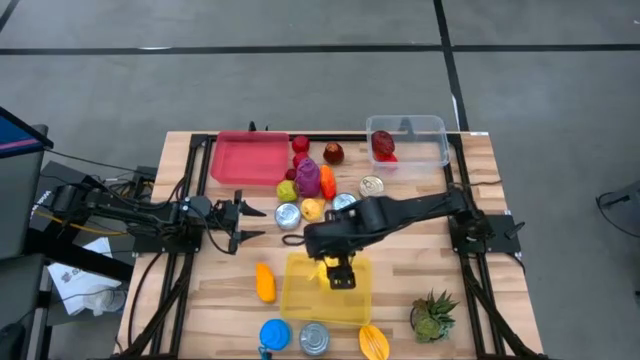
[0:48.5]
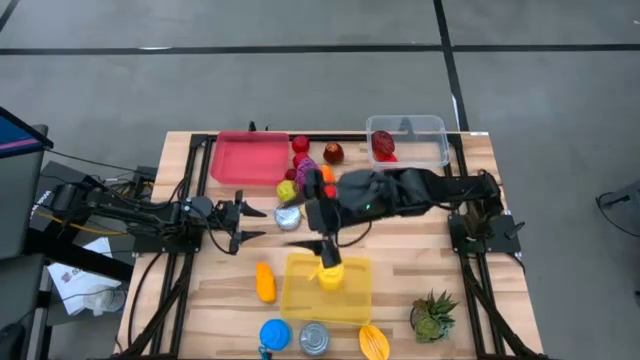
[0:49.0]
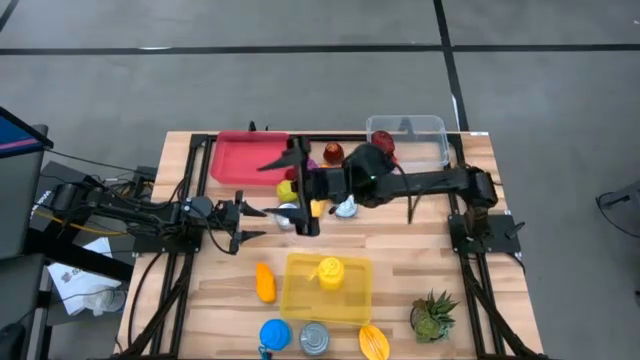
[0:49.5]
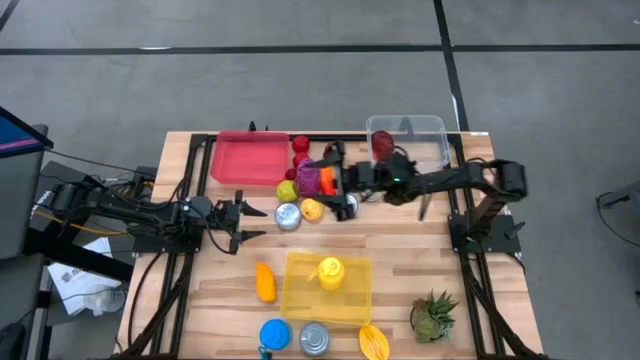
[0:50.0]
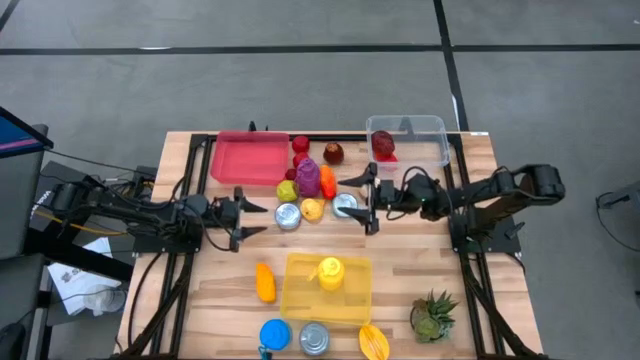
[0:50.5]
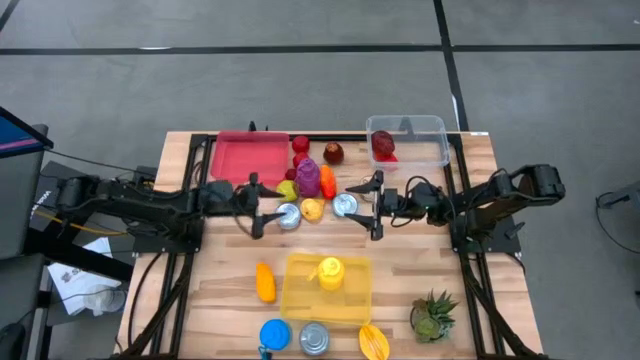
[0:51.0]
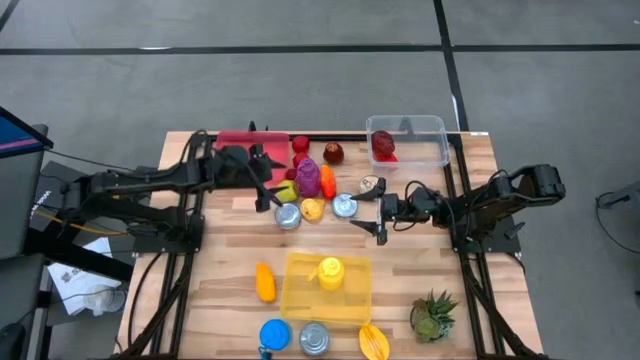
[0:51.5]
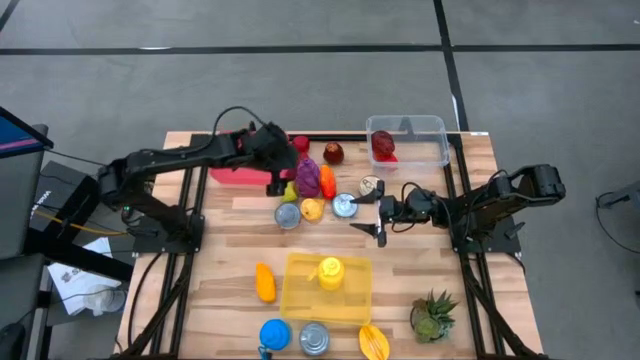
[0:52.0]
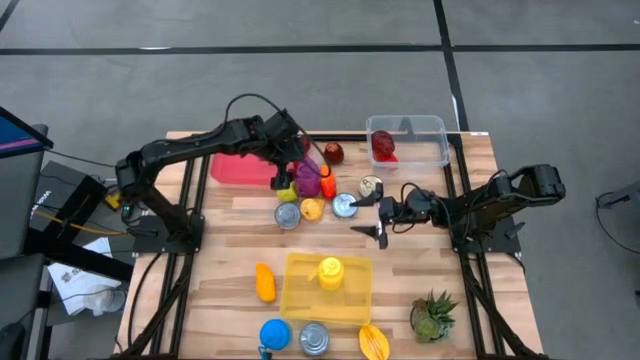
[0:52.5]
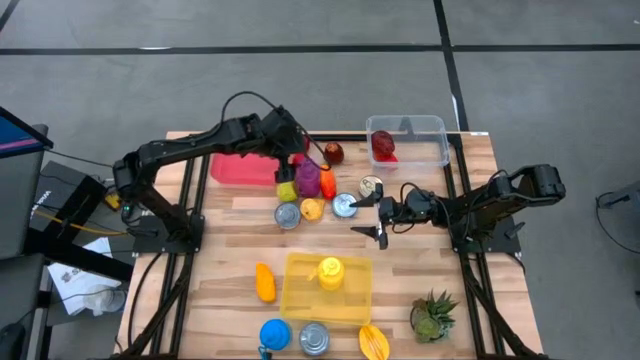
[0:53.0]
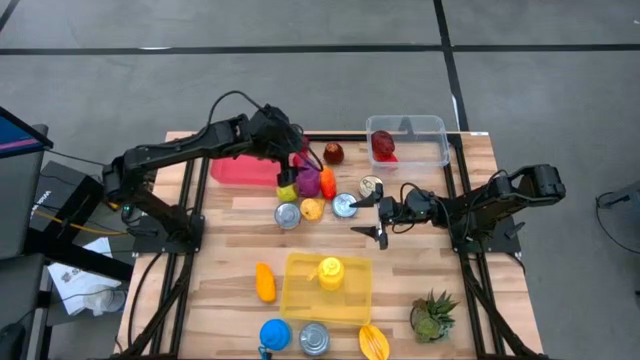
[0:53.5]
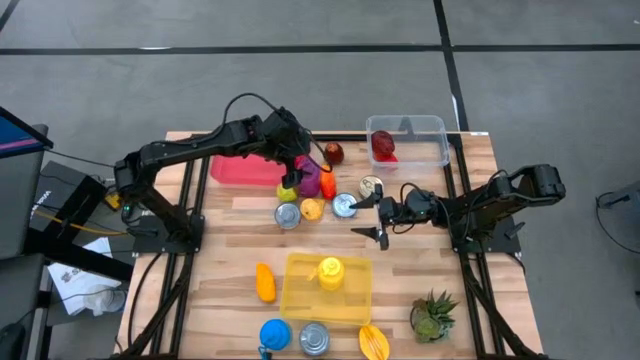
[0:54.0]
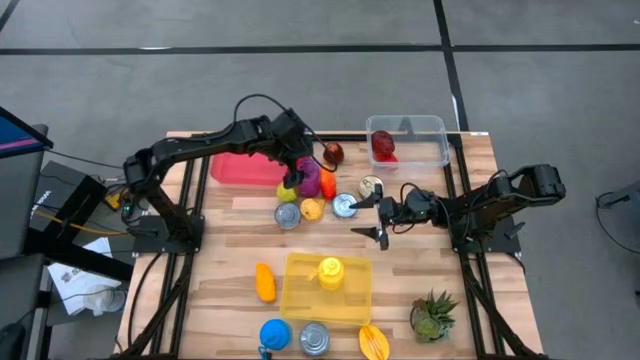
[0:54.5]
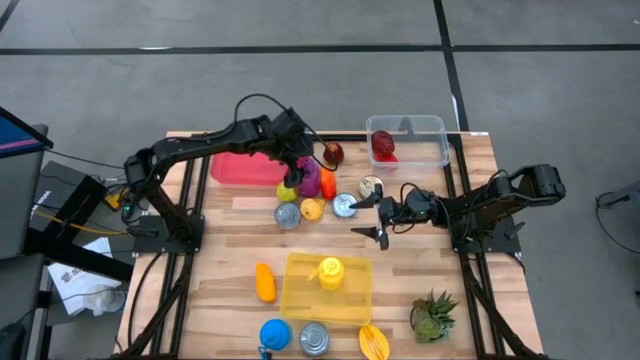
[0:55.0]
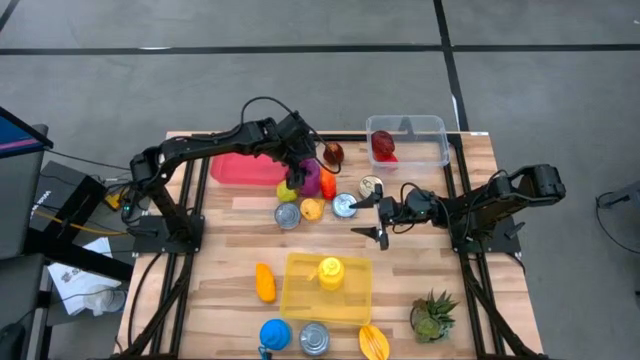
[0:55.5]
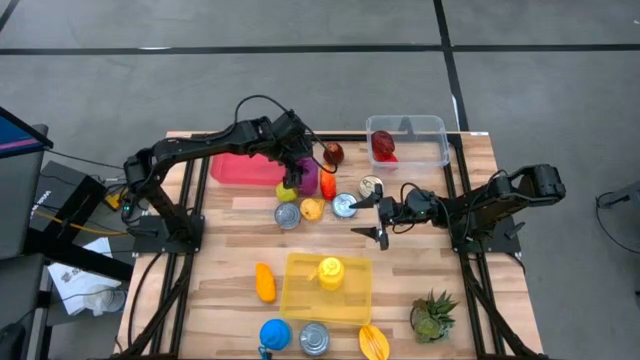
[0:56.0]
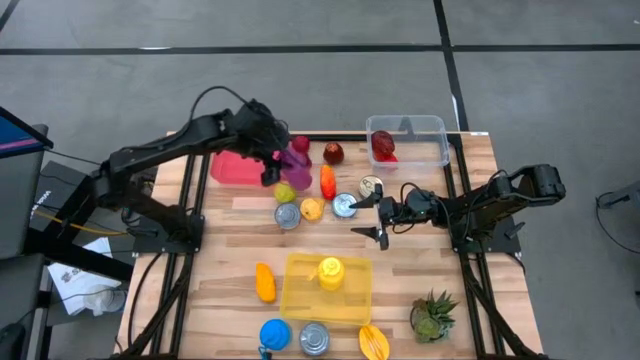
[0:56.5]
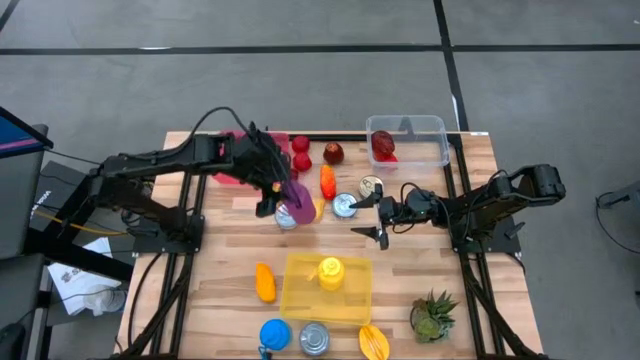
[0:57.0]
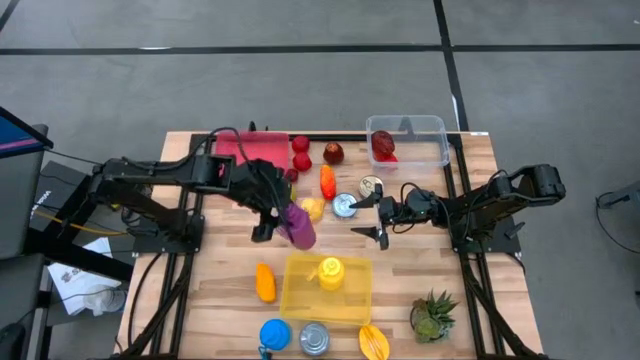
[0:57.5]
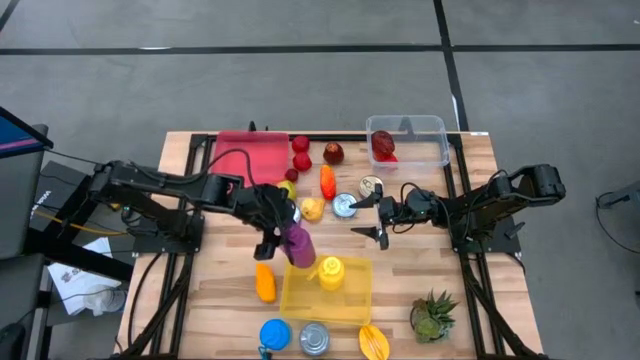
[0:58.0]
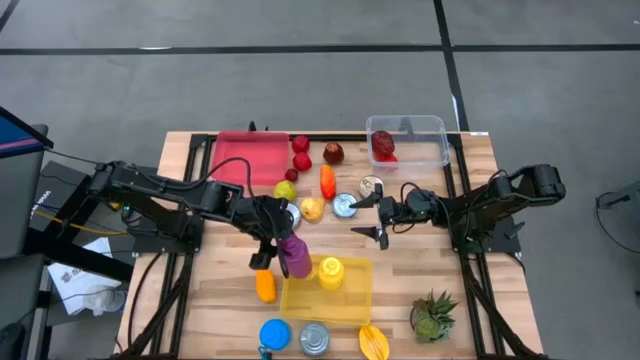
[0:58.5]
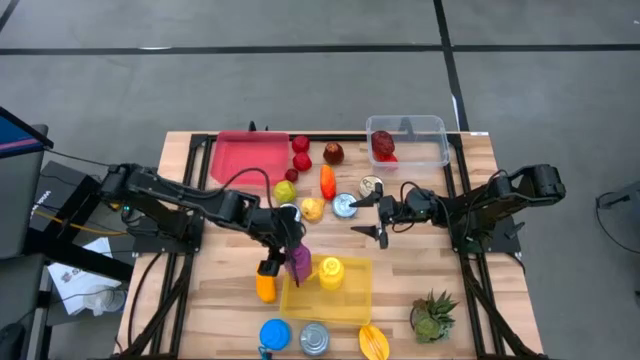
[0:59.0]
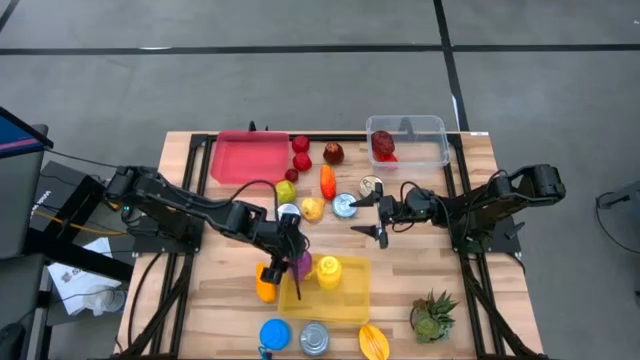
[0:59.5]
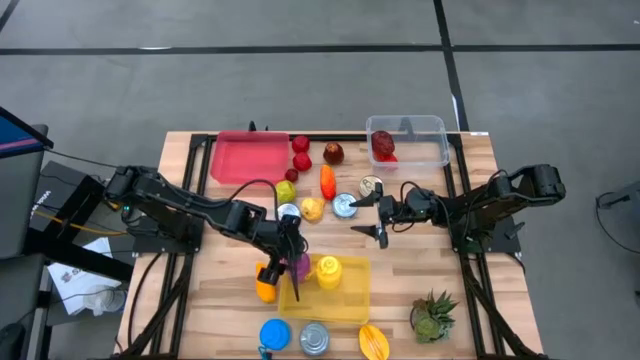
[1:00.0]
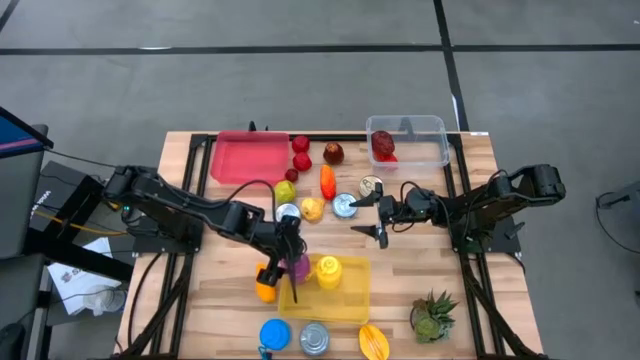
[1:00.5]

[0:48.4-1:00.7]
Task: Pick & Place Food Item
Put the purple water bottle into the yellow bin

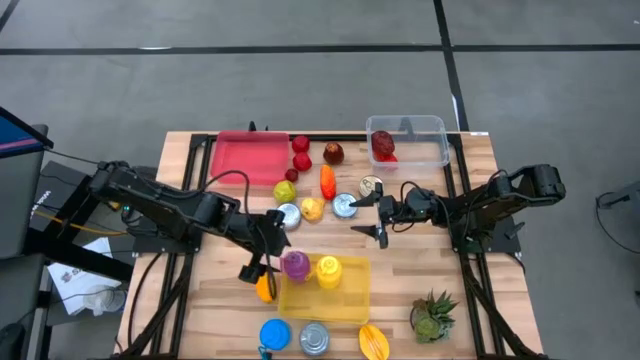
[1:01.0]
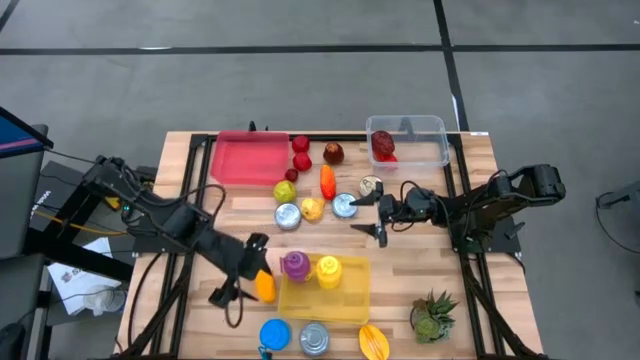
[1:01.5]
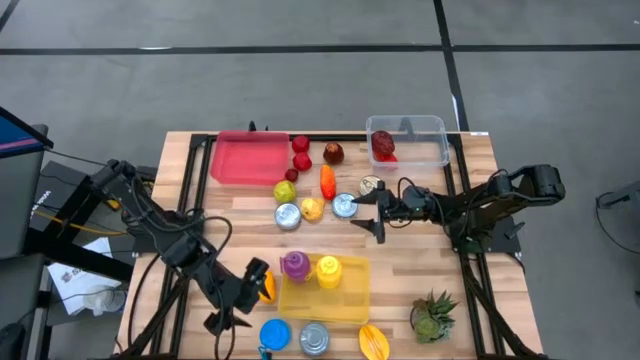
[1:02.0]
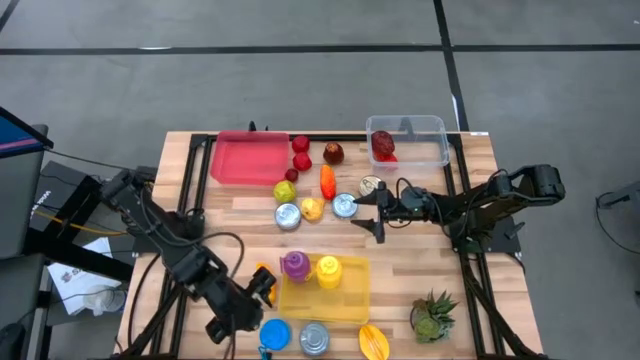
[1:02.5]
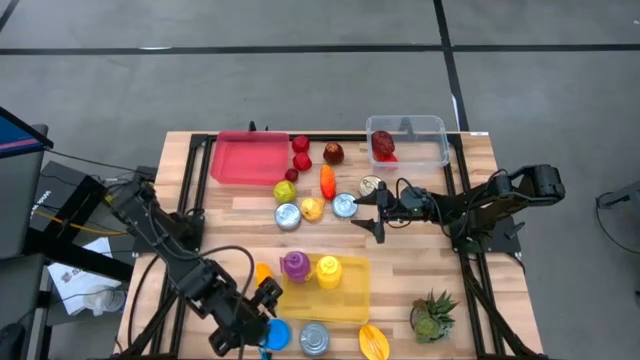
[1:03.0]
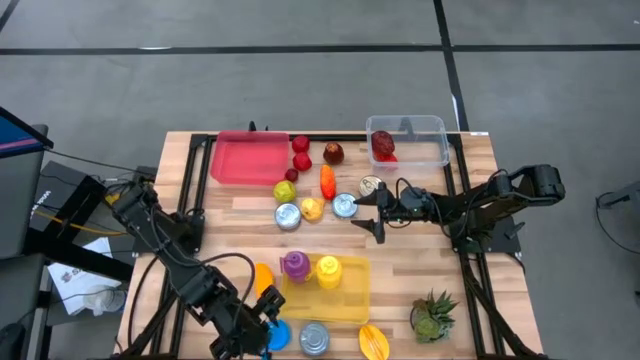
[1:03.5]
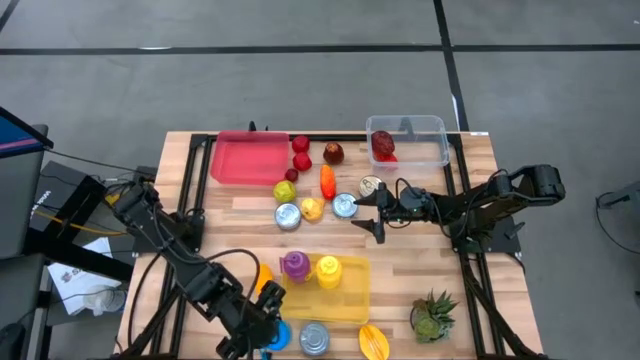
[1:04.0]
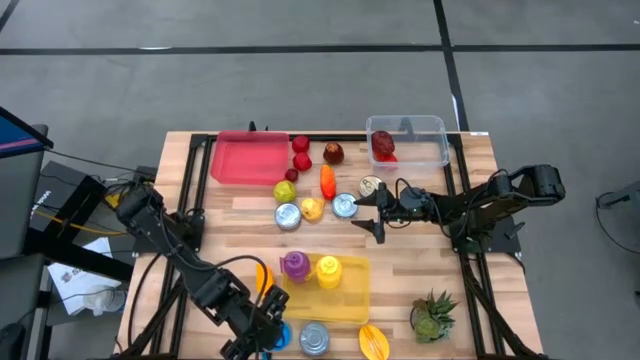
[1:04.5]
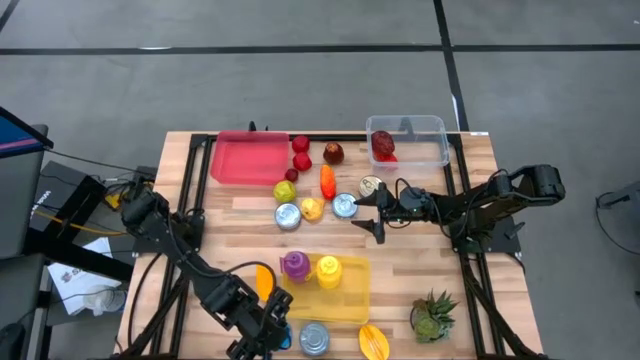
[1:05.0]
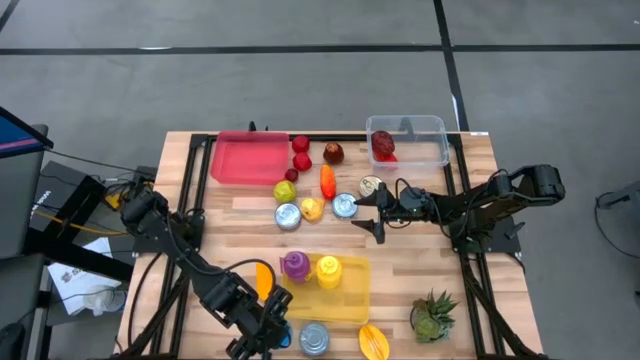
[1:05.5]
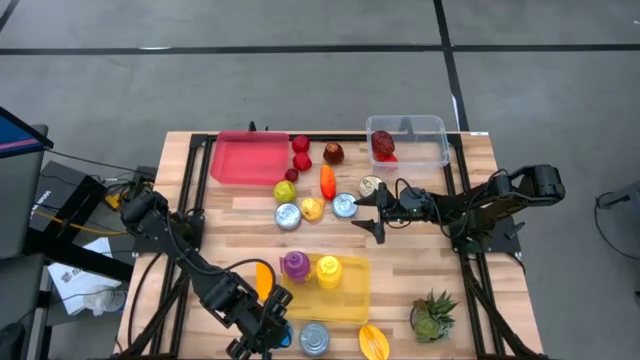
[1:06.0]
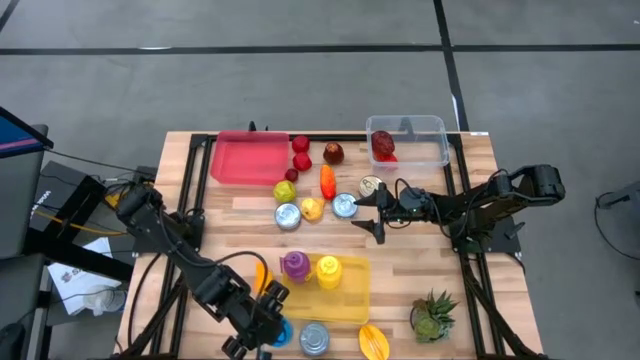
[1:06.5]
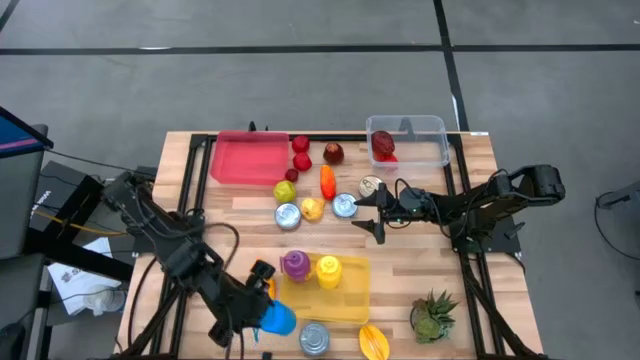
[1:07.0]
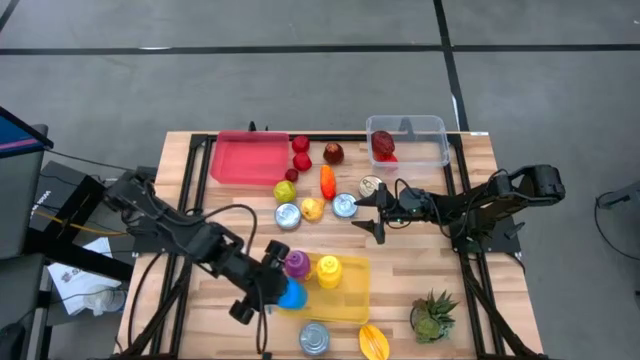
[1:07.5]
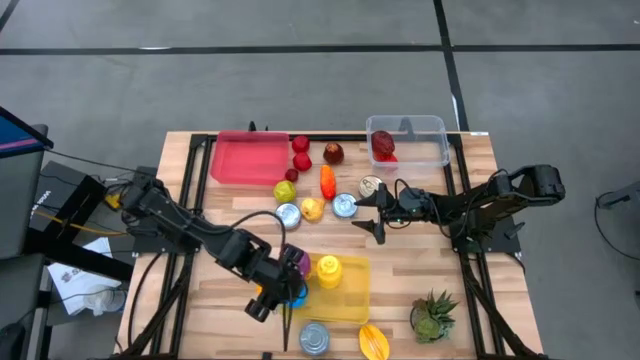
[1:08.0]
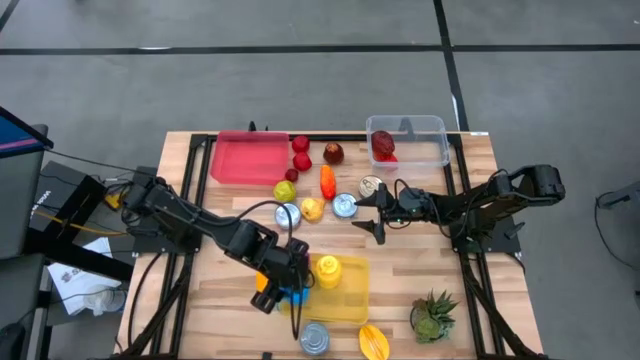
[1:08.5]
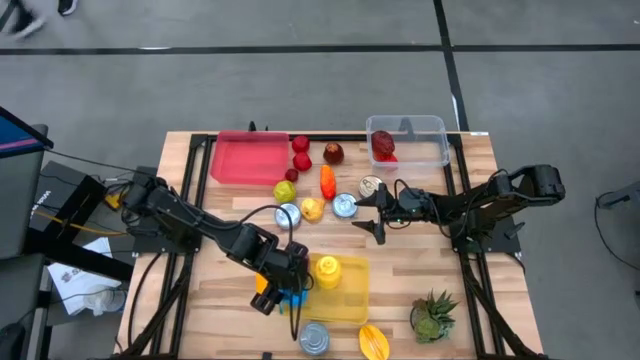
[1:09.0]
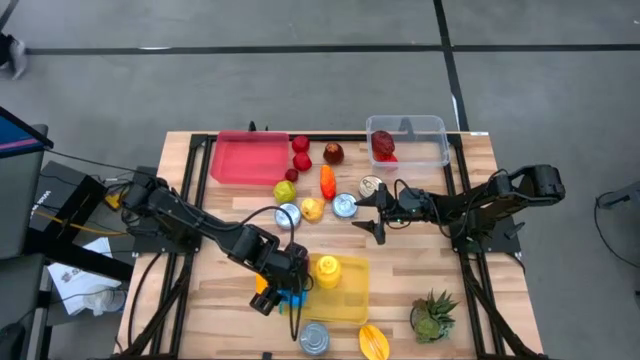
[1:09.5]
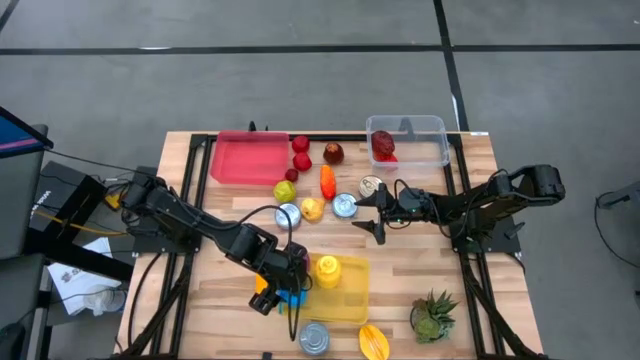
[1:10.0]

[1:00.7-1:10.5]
Put the blue water bottle into the yellow bin
